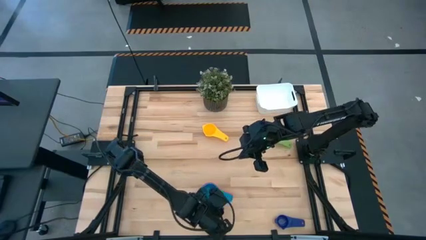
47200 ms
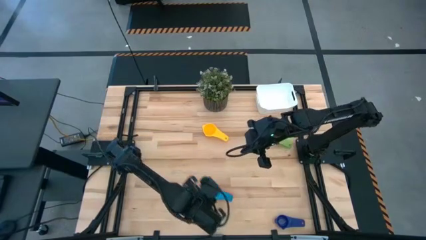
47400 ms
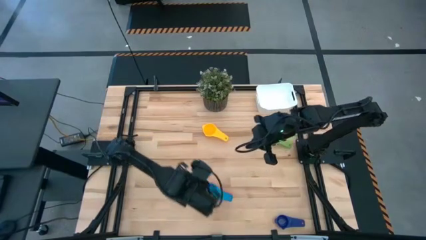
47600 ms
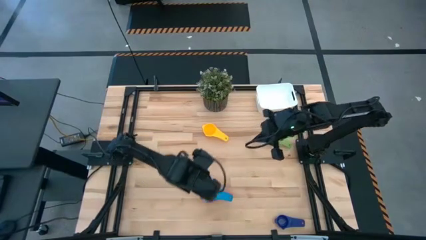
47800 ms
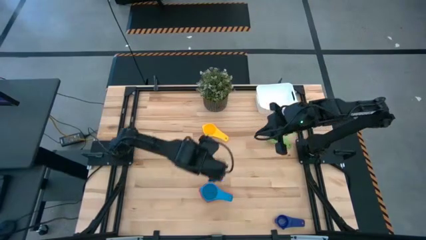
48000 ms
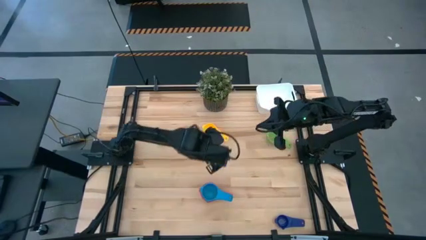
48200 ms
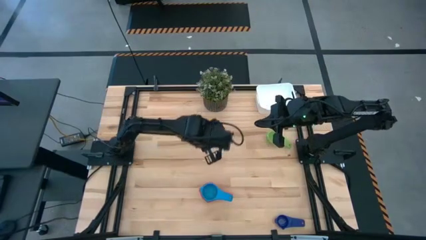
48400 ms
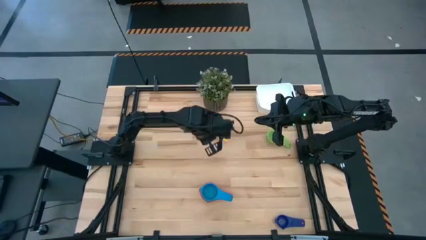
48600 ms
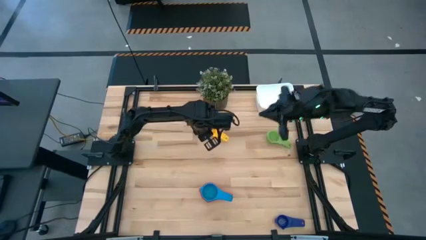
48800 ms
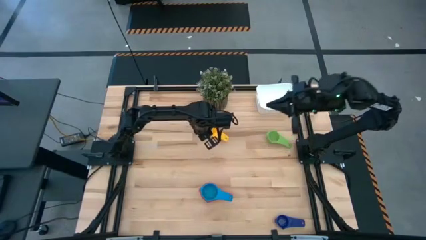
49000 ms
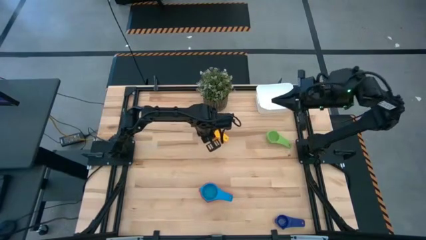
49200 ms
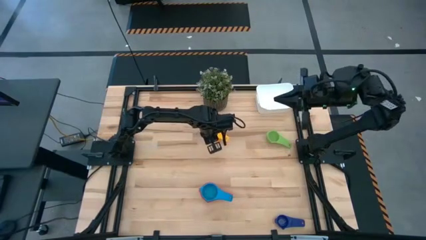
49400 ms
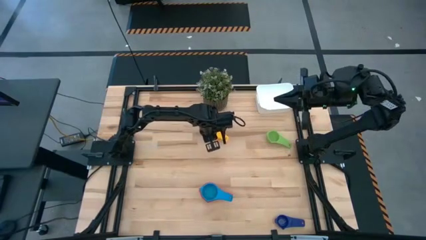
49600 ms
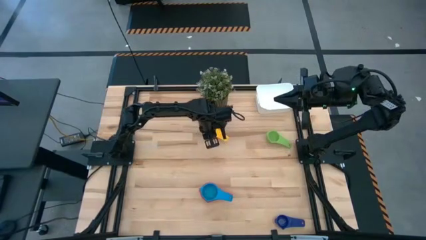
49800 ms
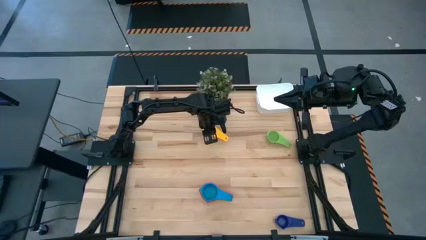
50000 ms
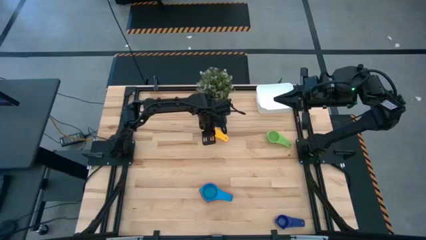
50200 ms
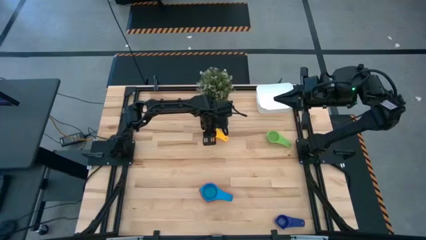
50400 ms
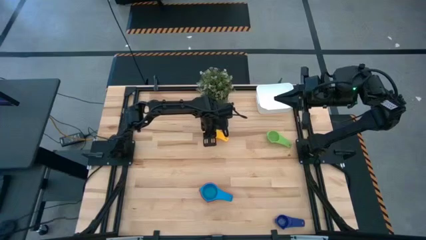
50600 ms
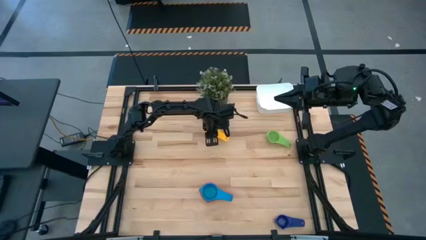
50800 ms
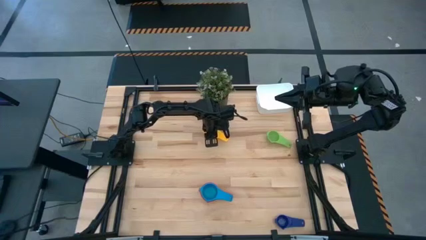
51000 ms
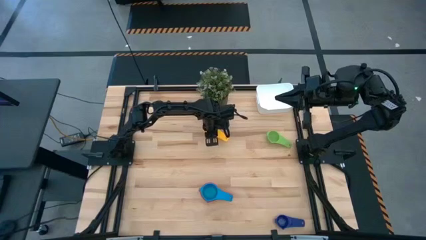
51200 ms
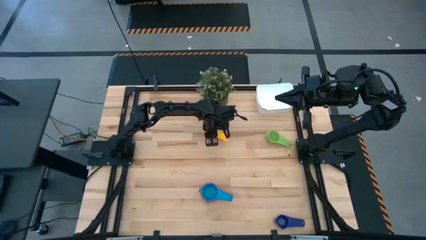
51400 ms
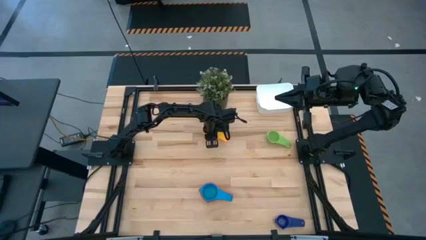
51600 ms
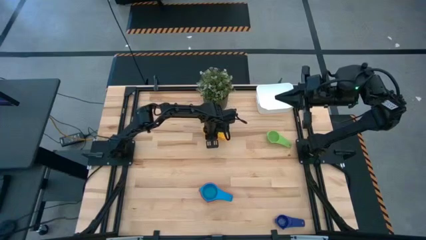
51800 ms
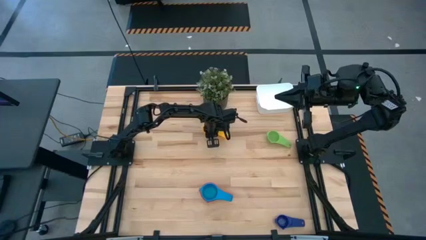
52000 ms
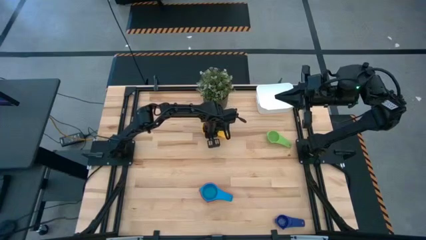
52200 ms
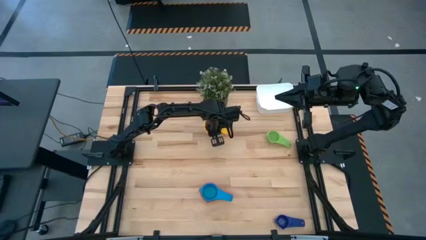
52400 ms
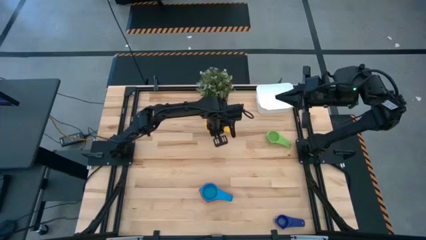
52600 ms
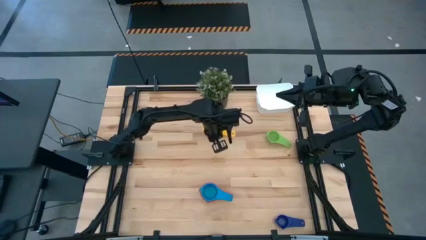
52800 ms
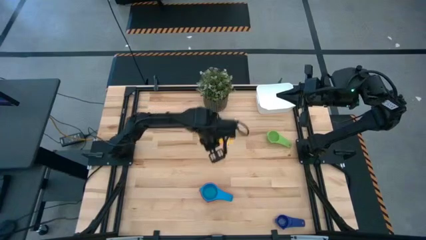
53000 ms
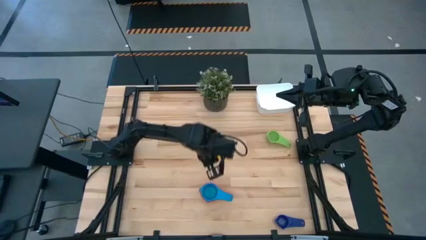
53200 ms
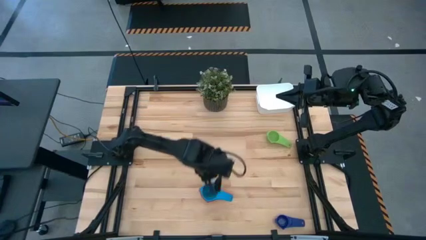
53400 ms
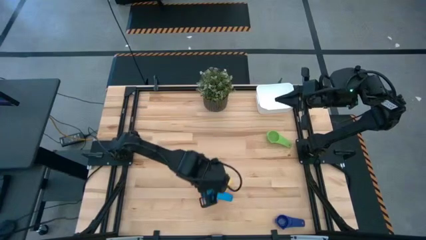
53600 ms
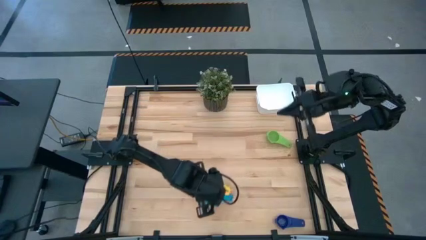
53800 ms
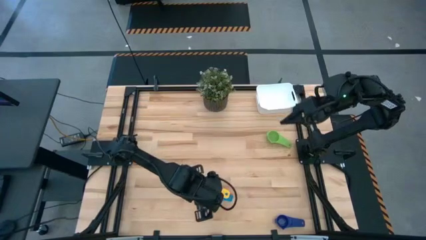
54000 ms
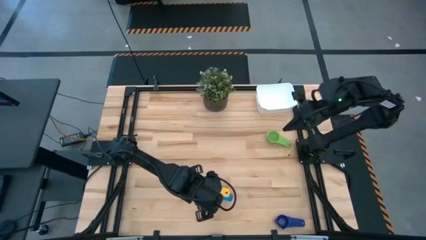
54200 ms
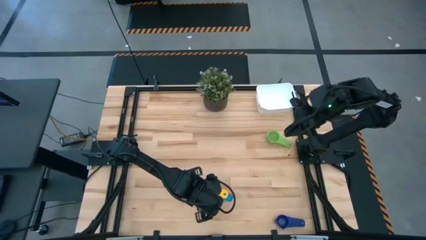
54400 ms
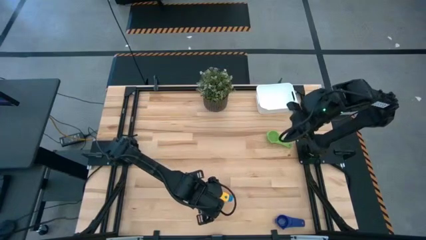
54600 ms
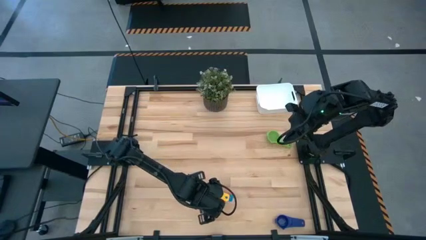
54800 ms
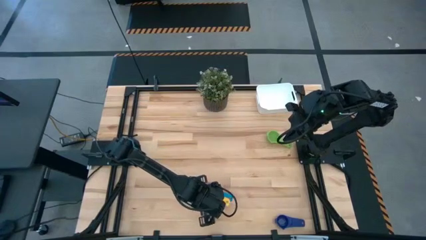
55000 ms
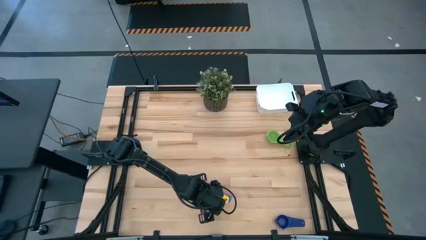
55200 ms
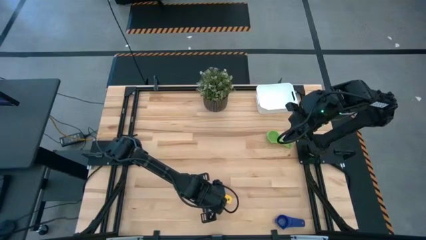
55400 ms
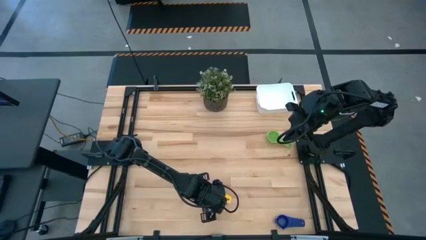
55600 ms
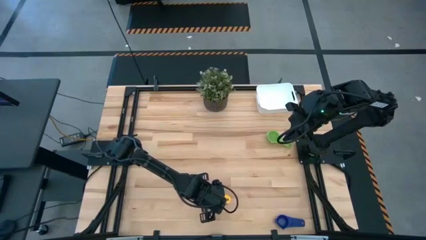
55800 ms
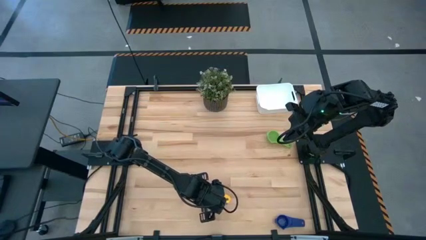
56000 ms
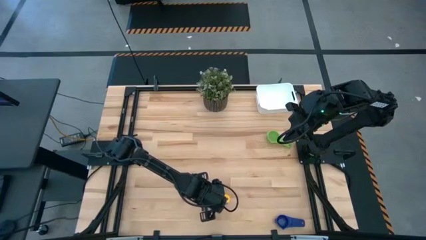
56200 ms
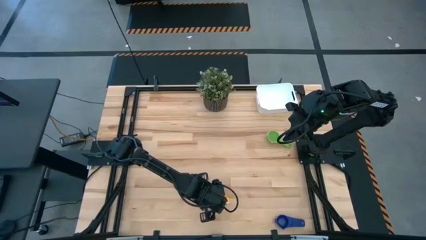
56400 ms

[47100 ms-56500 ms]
Task: Nest measuring cups in basket
Stack the yellow measuring cup on top of the light blue measuring cup

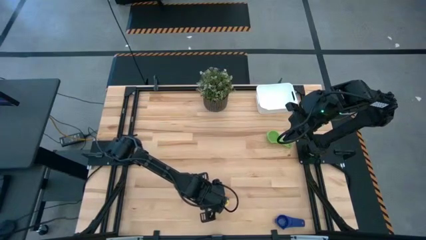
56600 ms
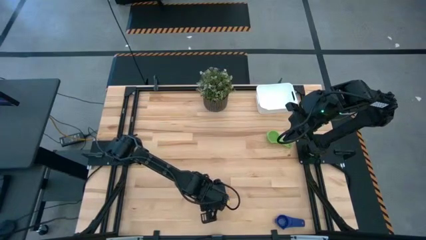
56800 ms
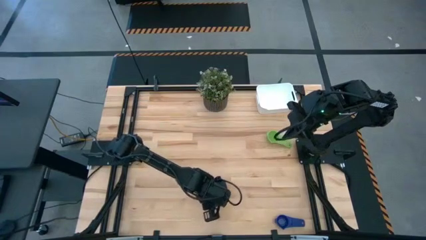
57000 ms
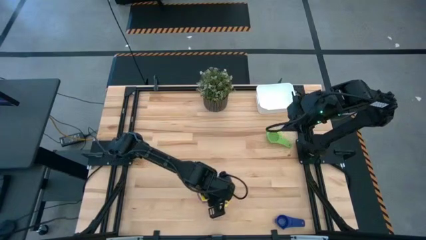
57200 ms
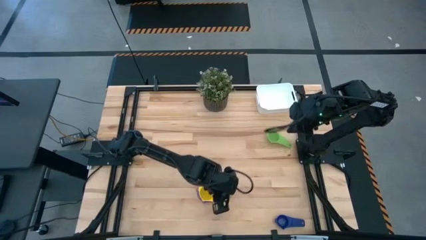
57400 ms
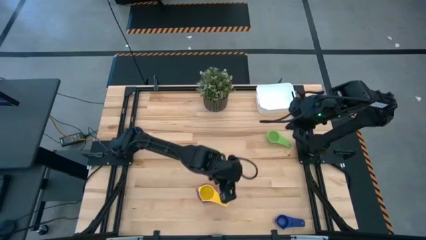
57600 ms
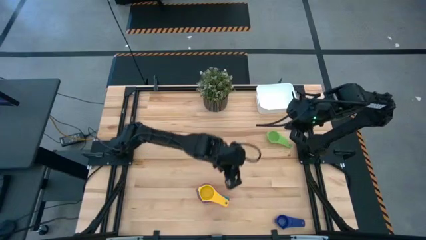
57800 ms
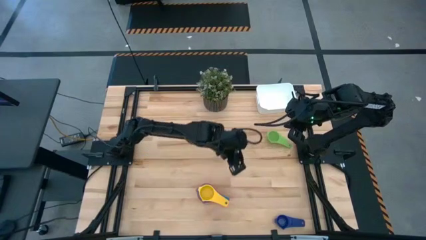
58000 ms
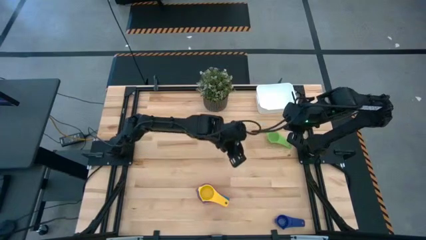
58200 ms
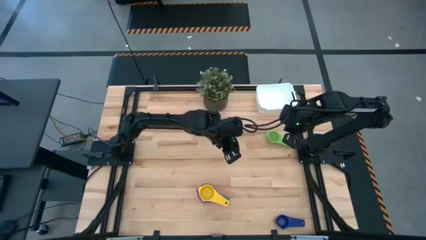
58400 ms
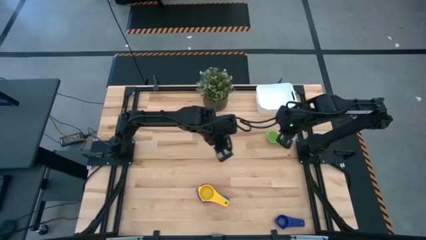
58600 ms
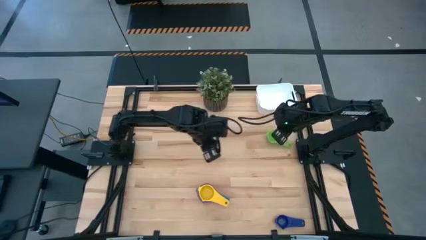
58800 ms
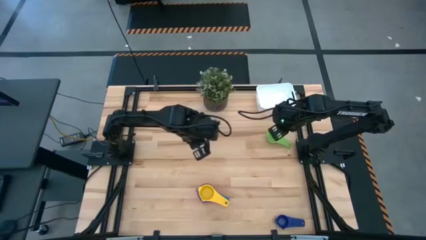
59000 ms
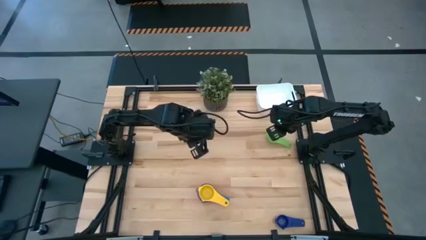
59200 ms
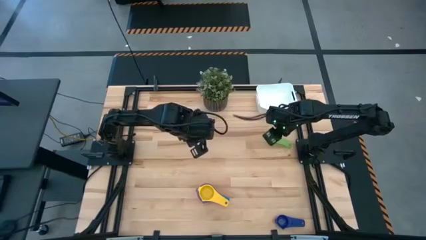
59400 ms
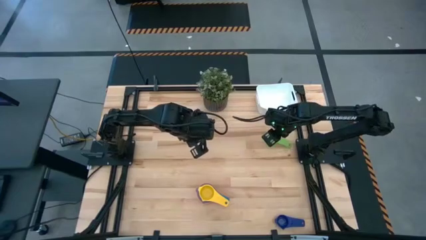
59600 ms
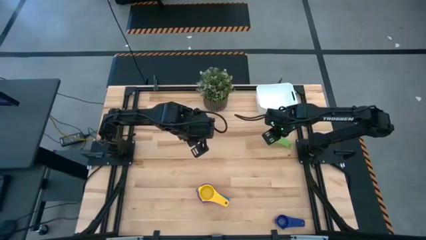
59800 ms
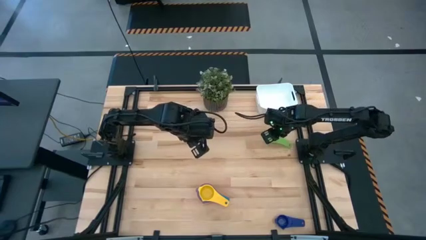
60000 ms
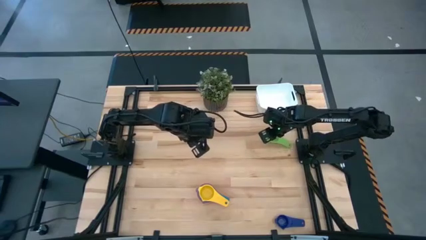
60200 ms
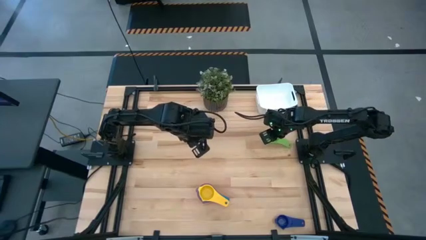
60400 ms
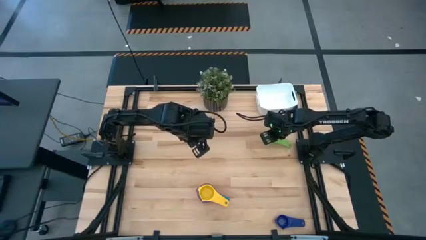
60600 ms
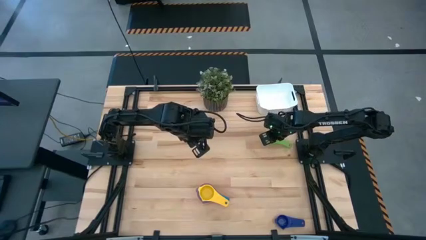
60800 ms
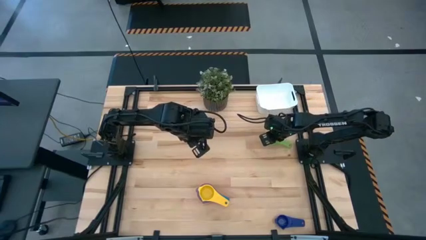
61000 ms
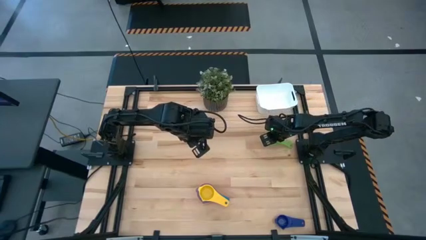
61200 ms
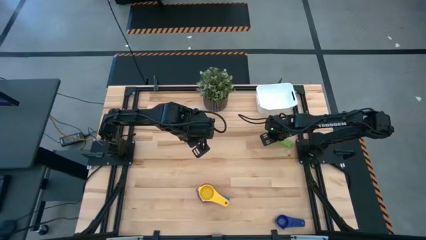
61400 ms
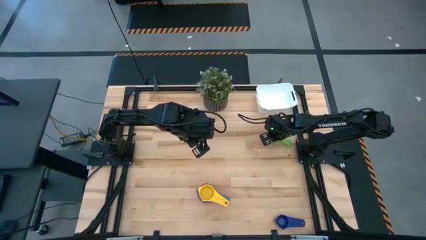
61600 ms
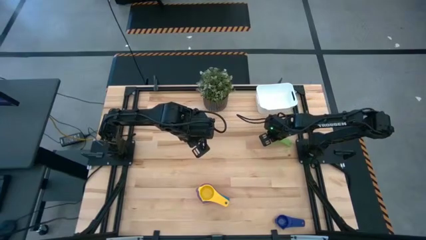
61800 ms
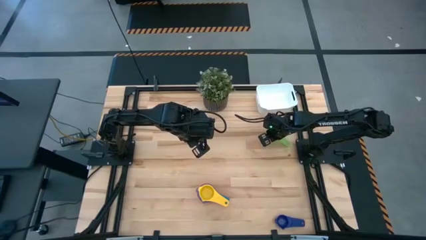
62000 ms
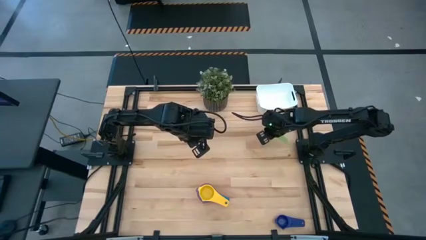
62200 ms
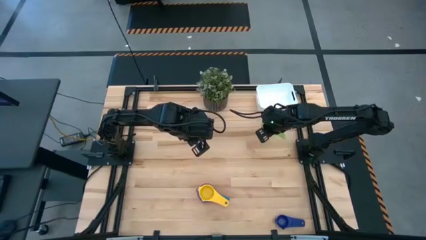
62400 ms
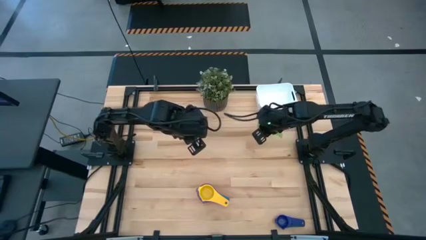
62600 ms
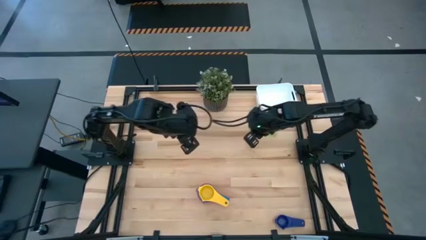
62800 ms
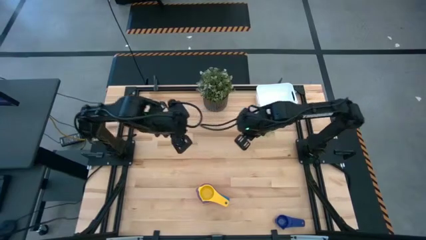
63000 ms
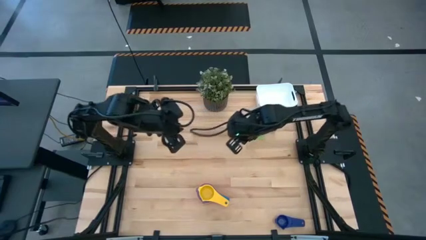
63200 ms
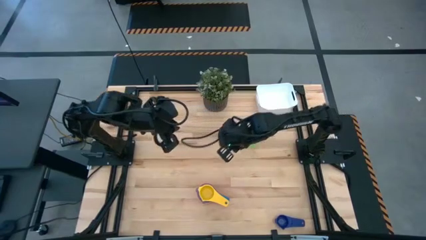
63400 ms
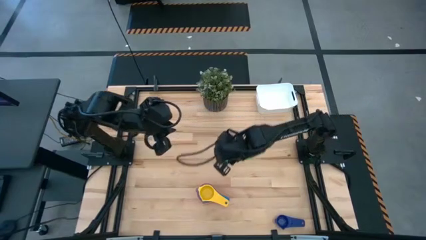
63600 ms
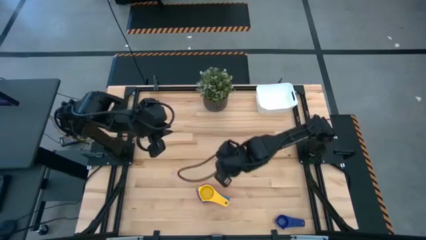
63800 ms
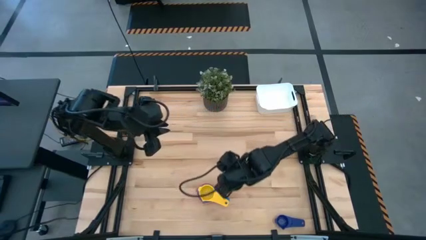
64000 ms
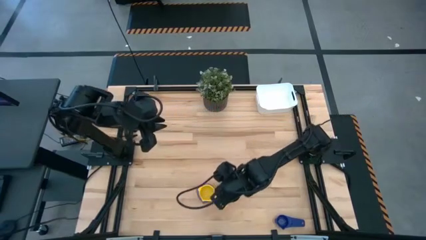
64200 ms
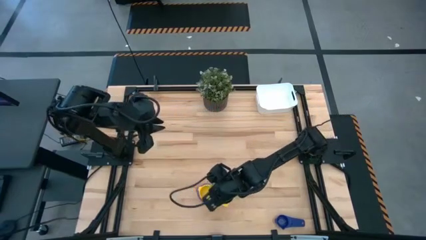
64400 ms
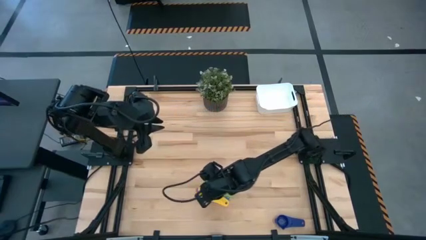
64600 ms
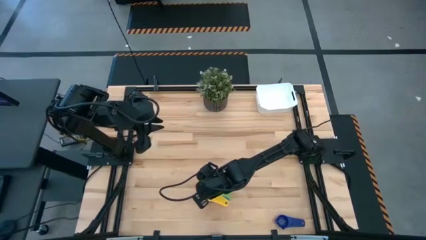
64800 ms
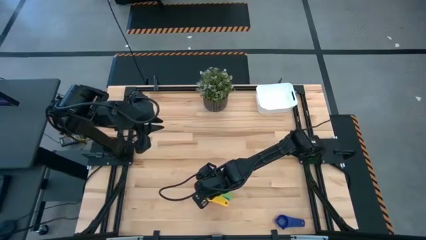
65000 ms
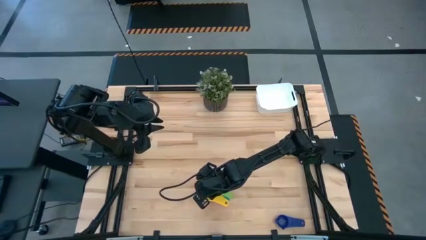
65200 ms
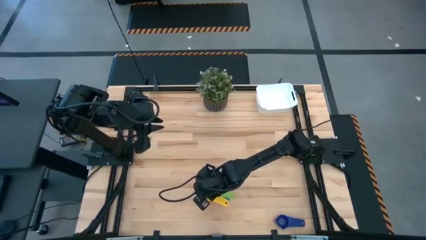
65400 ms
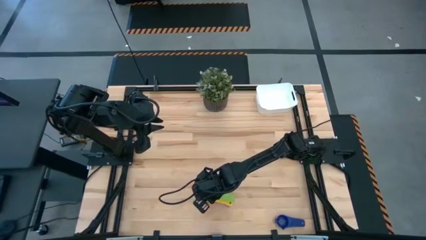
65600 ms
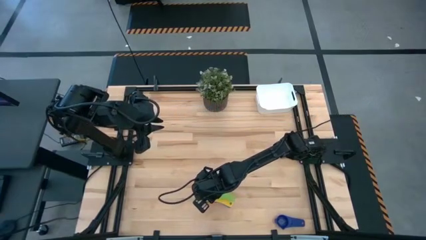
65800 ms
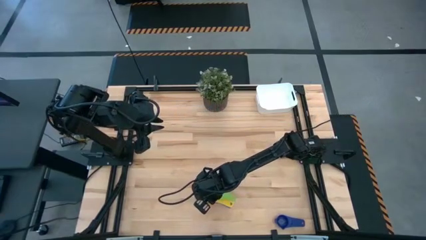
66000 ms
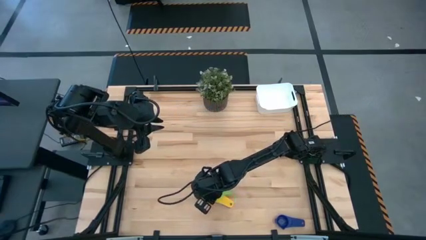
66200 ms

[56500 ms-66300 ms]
Stack the green measuring cup on top of the yellow measuring cup
